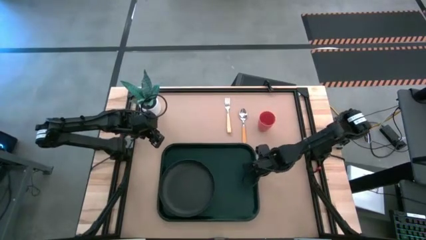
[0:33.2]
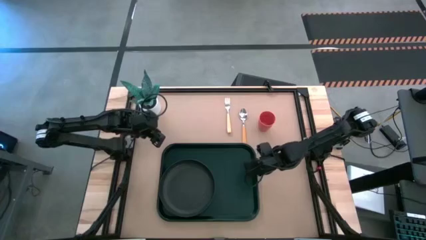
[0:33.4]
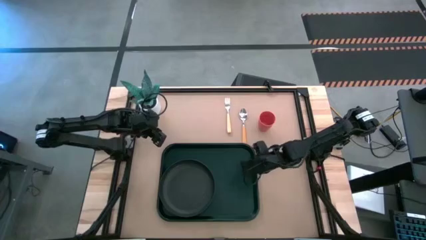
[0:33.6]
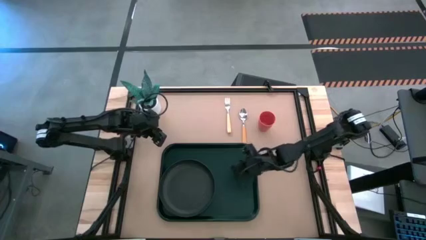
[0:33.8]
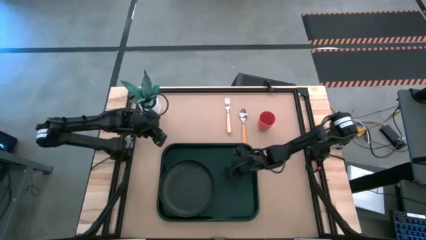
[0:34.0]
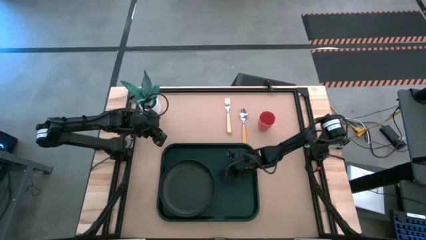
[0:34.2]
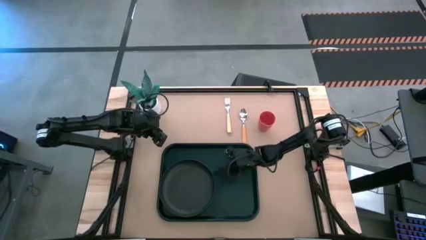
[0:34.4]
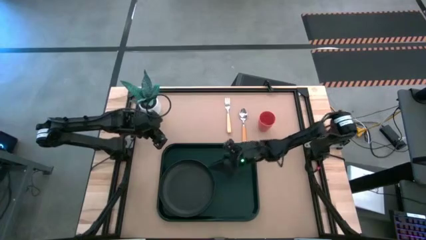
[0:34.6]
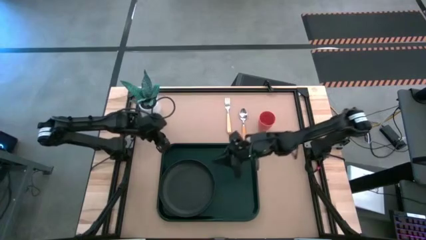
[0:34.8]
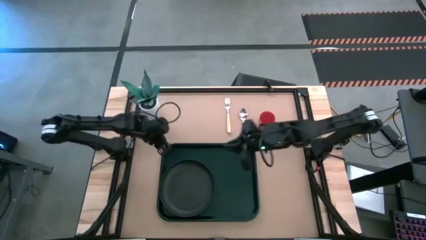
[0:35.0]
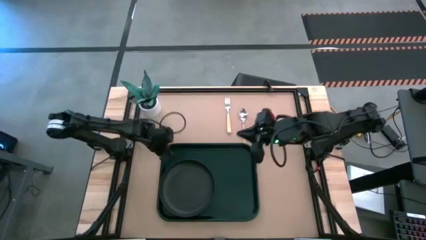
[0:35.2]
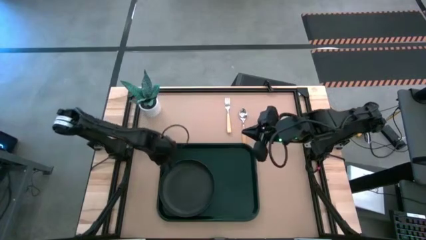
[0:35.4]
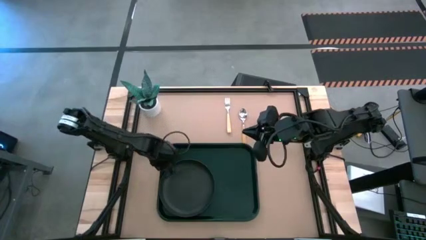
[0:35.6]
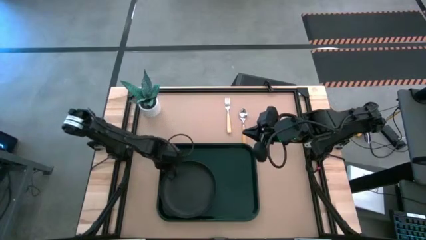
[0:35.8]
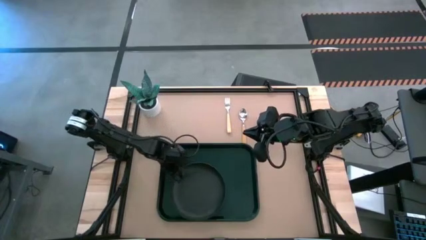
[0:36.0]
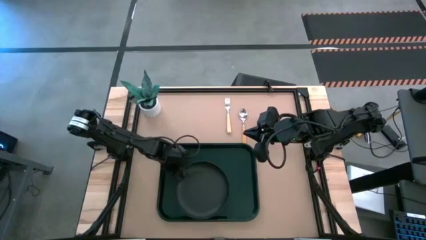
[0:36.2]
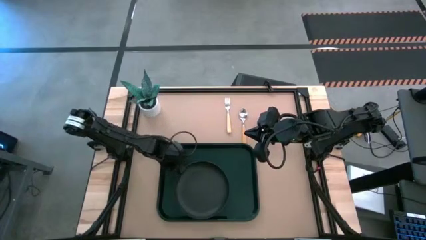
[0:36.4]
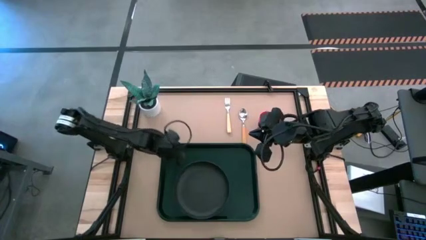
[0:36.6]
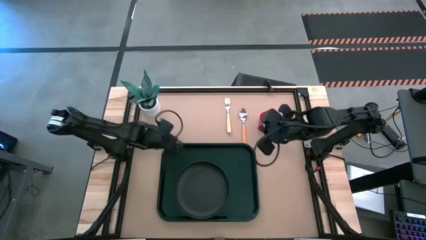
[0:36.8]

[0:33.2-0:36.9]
Task: Pick and place plate/cup/fork/spoon on tray
Adjust the black plate

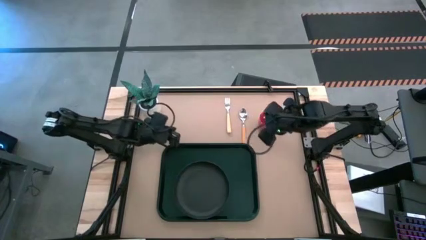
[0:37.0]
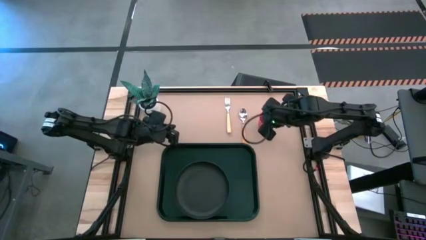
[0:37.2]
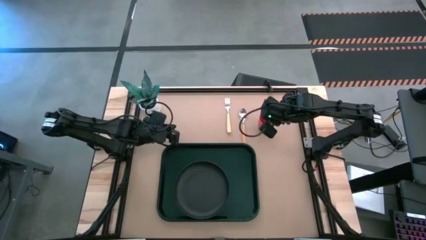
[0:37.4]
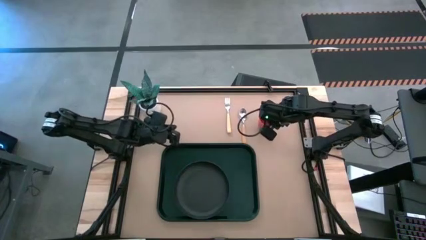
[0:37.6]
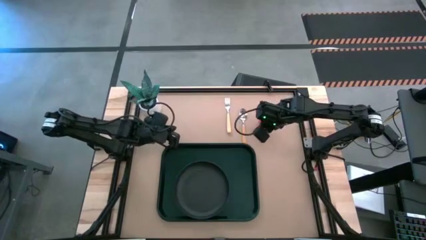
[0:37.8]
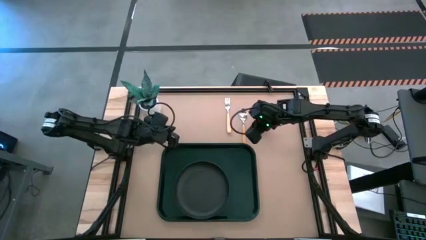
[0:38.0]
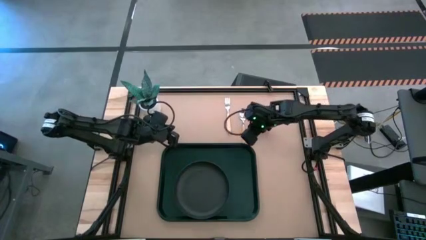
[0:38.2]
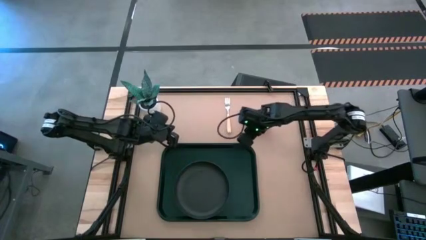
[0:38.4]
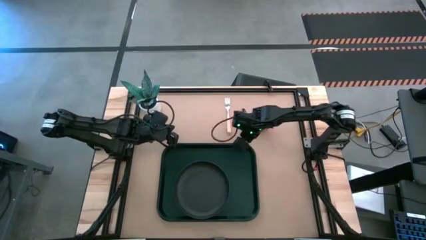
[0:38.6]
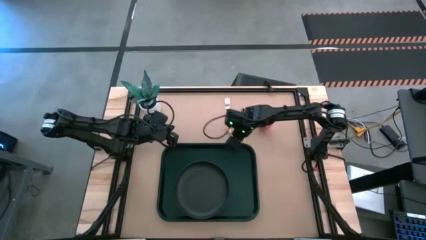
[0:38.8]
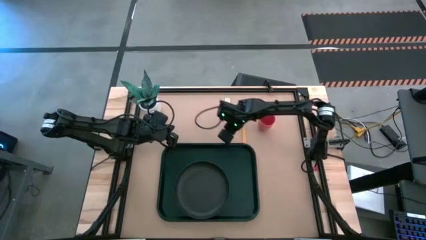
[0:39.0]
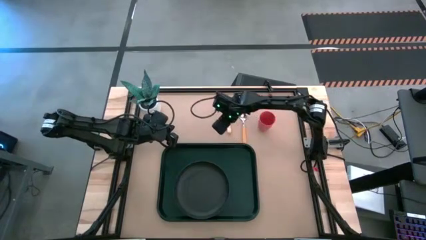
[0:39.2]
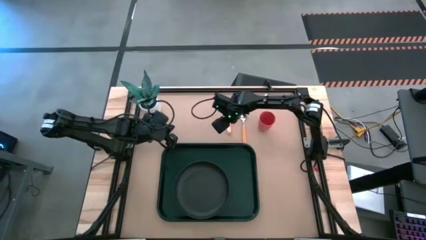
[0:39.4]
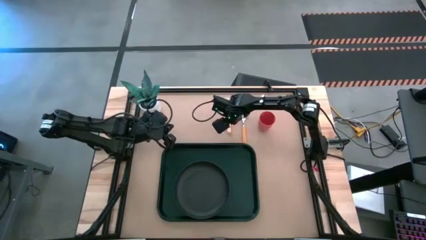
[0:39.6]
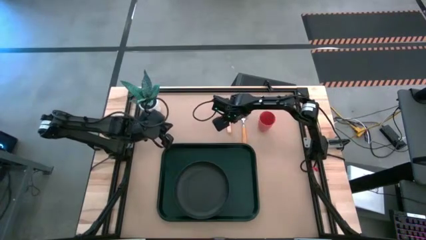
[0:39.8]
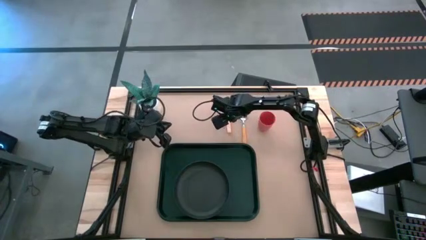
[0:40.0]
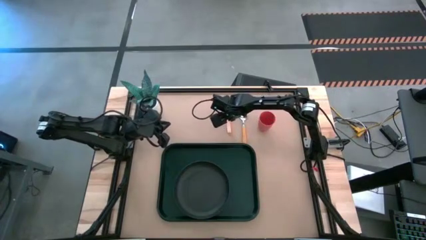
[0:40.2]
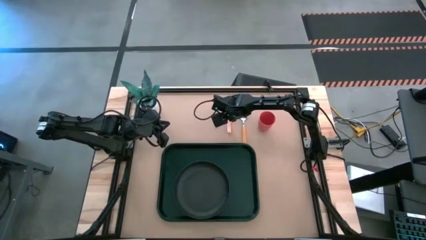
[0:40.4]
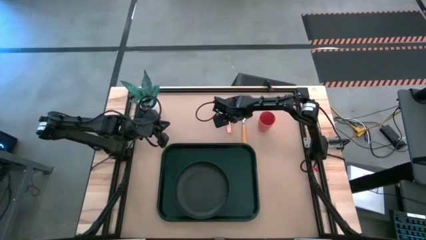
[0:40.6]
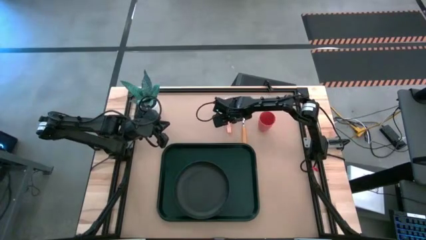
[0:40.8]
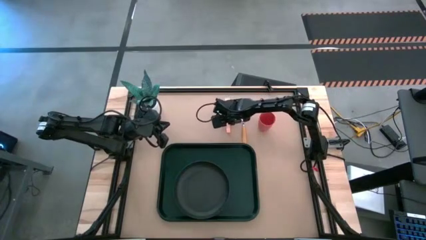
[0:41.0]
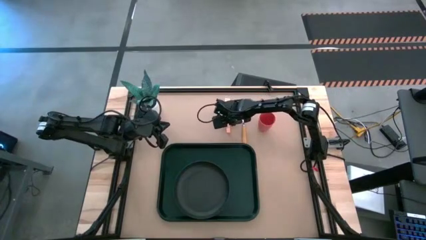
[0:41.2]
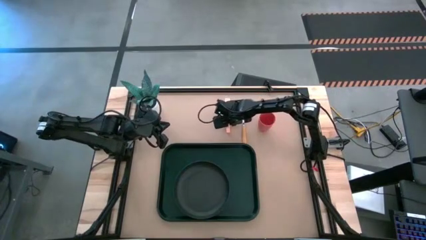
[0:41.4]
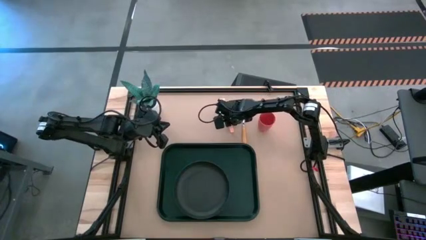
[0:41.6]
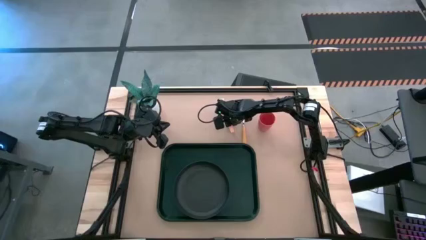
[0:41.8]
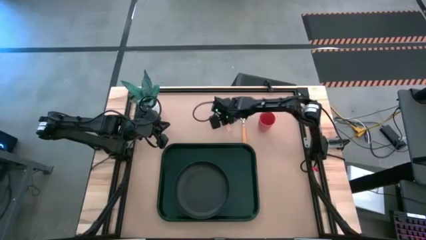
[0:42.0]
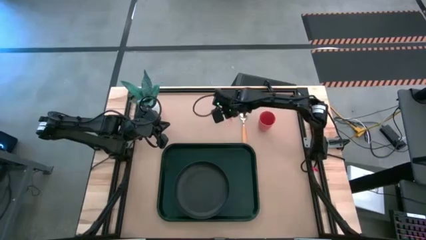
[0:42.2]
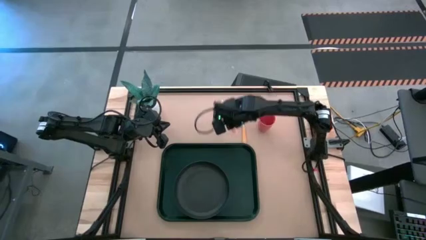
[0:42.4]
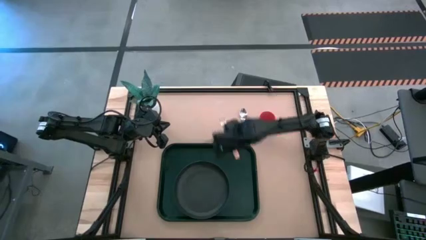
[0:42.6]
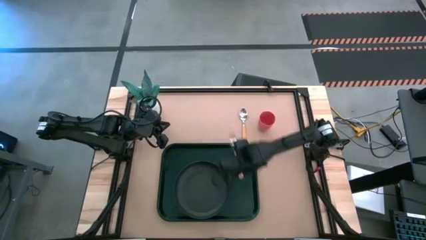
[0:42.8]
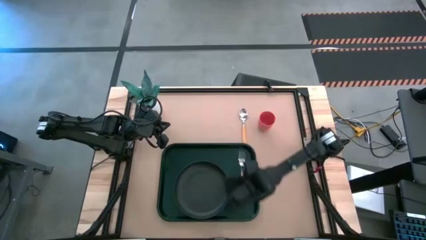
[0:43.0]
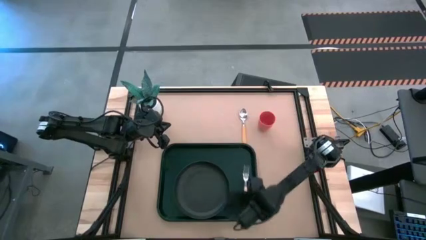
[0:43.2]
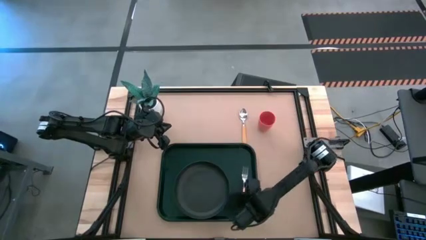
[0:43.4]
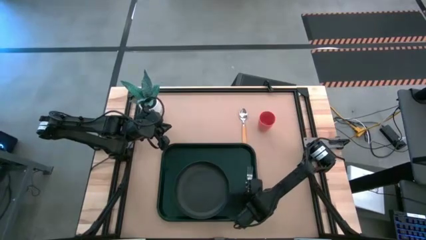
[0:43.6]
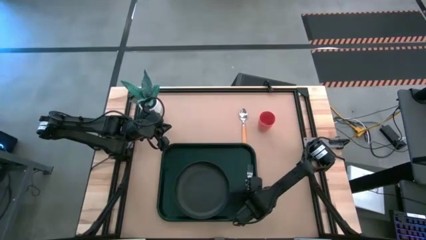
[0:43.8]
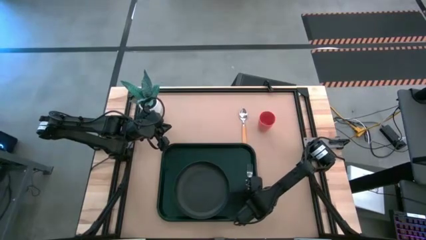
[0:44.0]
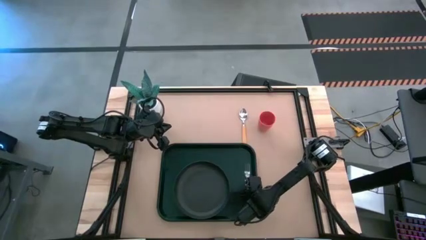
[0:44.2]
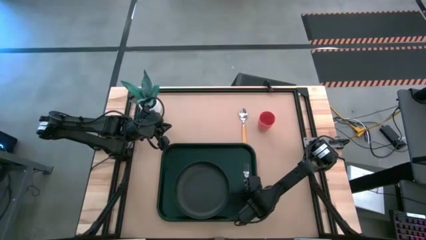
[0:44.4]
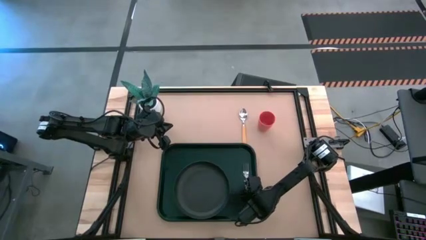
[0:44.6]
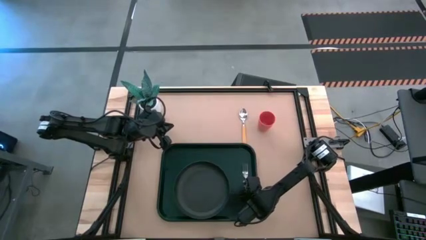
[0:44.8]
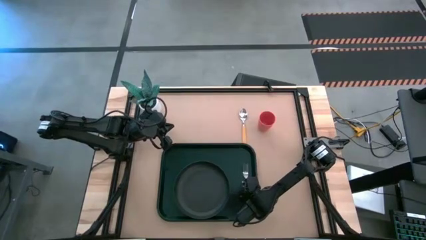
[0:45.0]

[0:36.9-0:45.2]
Put the orange fork on the black serving tray to the right side of the black plate

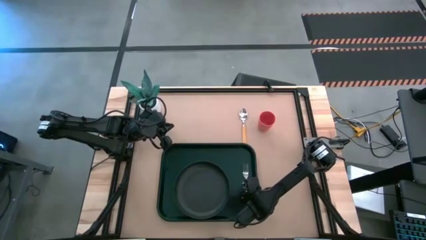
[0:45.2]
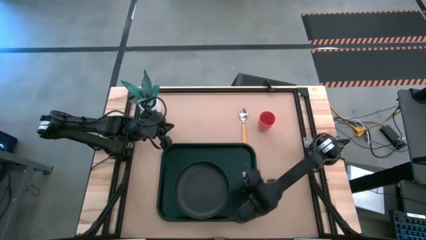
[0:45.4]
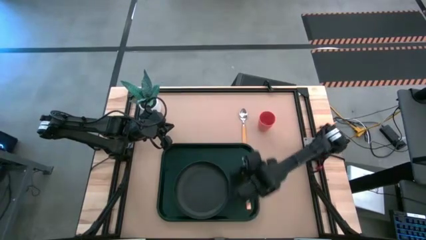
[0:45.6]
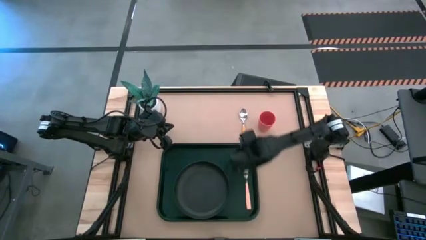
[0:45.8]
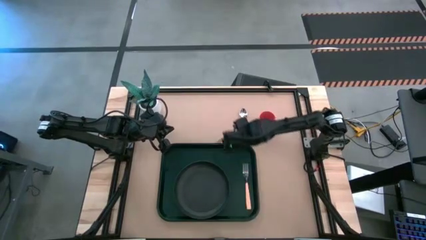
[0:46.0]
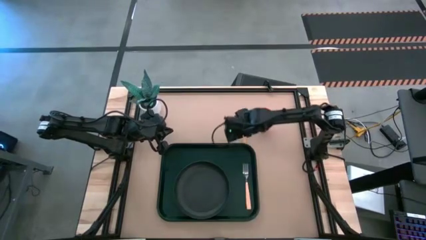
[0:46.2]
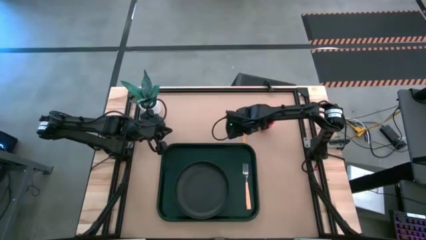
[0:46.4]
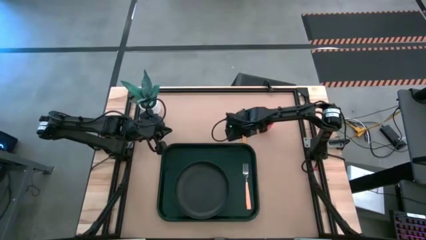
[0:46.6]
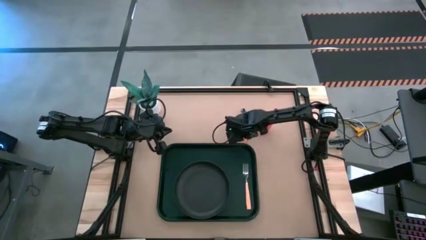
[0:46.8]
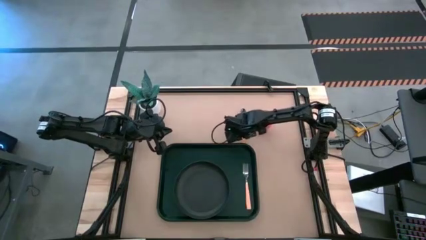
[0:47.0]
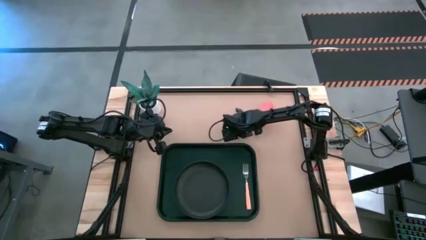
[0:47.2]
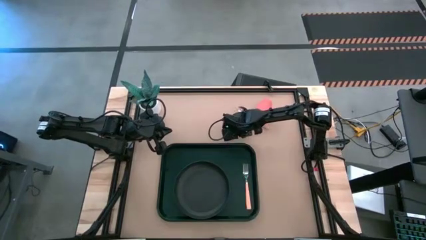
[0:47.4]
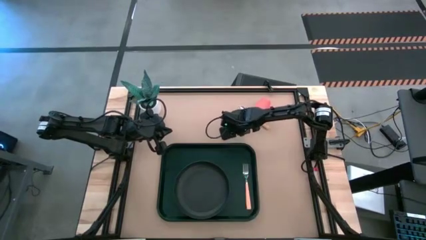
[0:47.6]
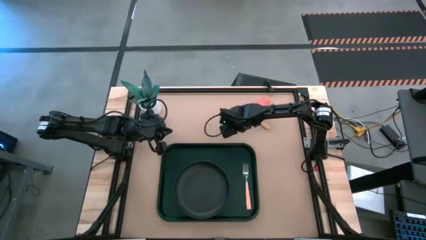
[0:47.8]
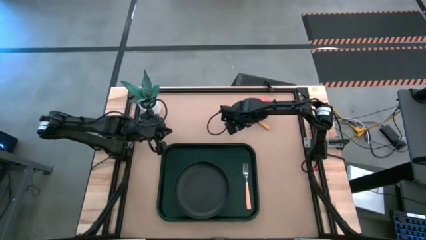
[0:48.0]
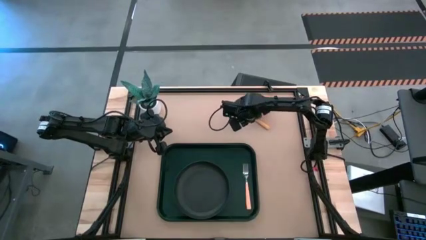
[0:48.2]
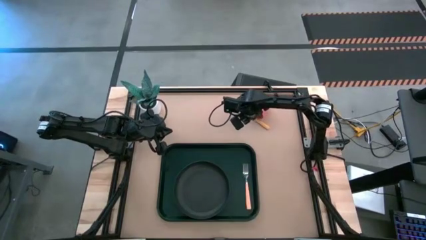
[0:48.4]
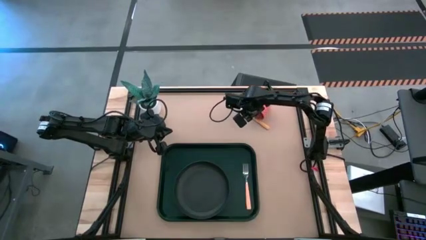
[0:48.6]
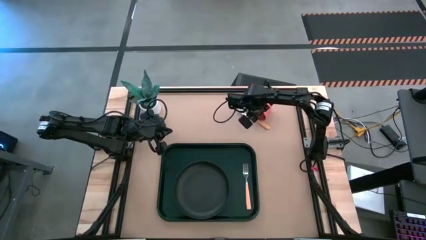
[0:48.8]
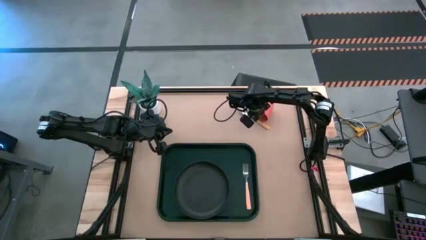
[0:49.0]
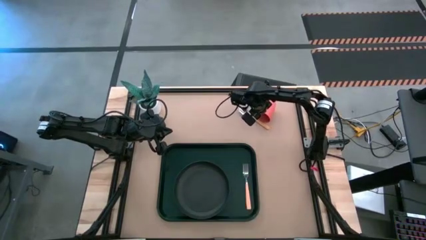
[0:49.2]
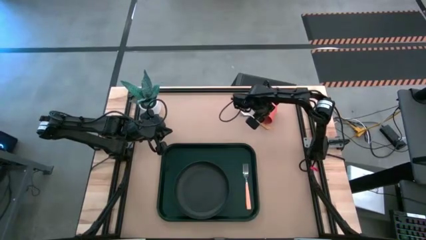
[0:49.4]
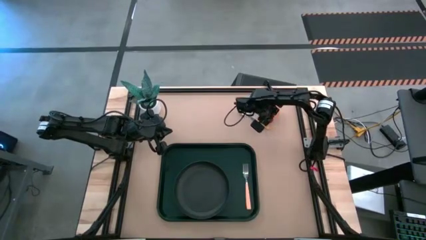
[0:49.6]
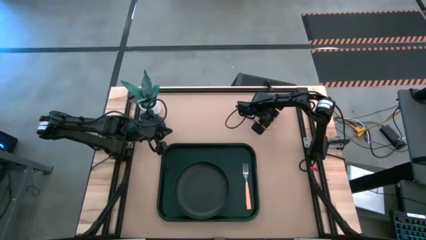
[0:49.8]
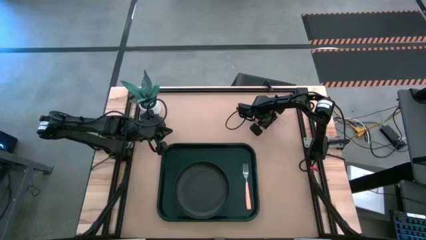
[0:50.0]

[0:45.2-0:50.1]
Put the orange cup on the black serving tray to the top right of the black plate
